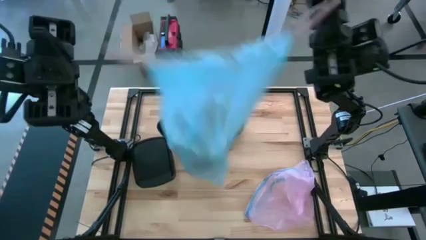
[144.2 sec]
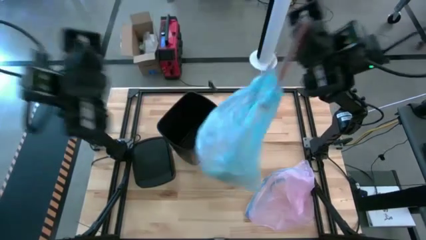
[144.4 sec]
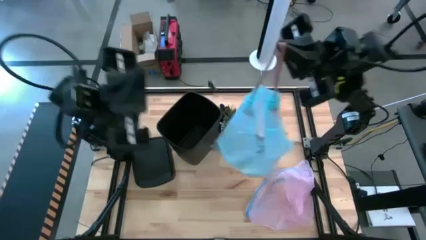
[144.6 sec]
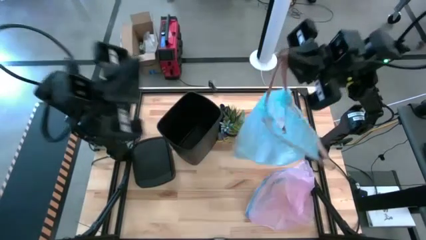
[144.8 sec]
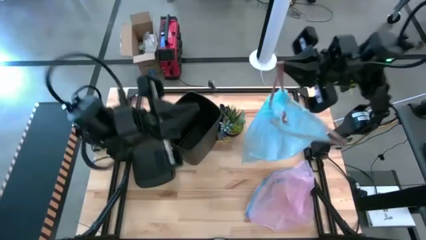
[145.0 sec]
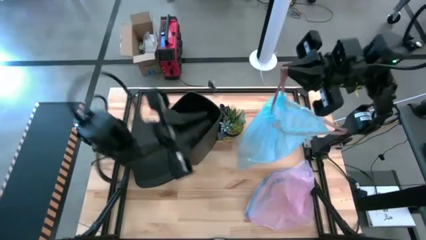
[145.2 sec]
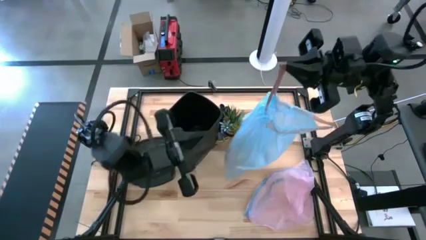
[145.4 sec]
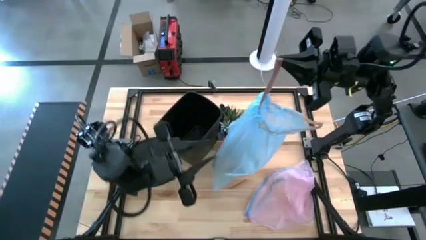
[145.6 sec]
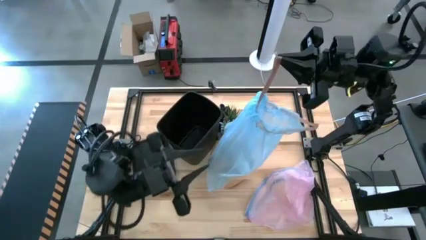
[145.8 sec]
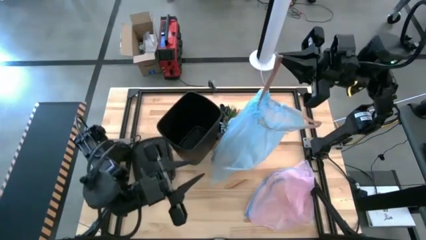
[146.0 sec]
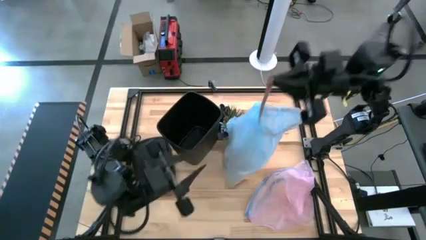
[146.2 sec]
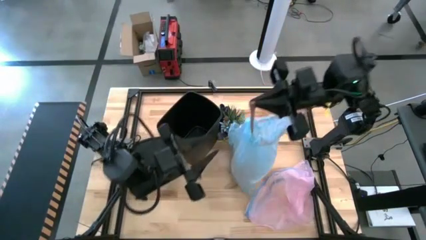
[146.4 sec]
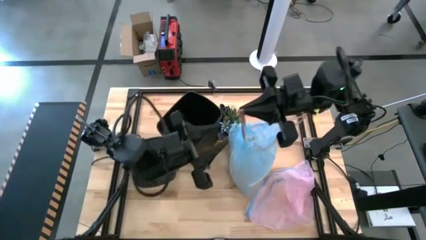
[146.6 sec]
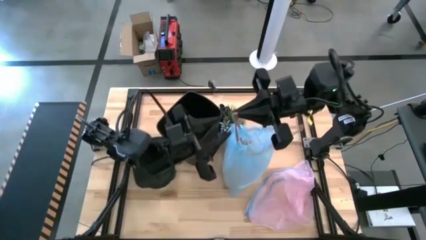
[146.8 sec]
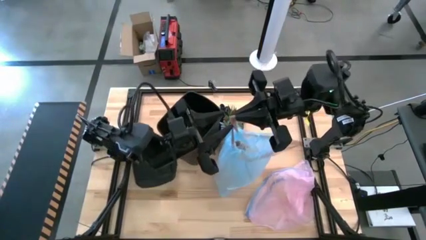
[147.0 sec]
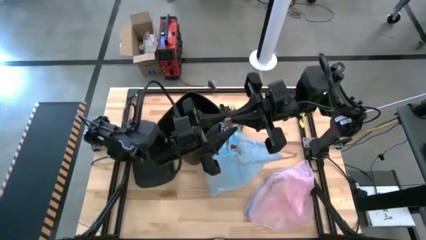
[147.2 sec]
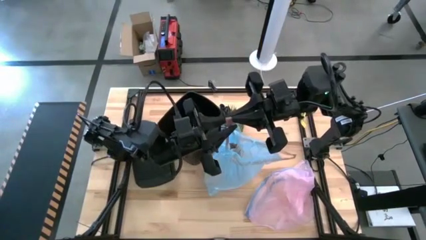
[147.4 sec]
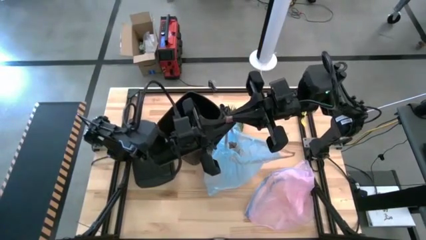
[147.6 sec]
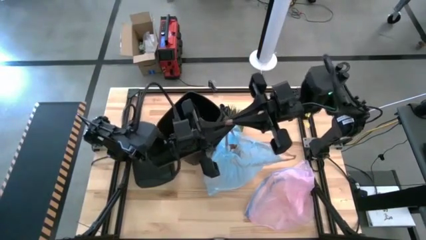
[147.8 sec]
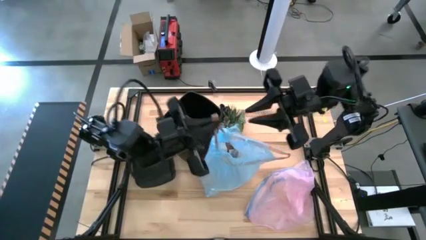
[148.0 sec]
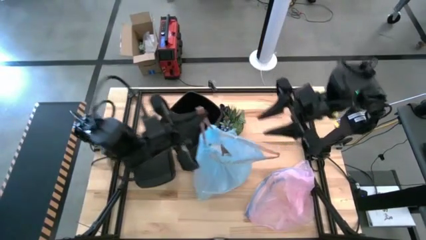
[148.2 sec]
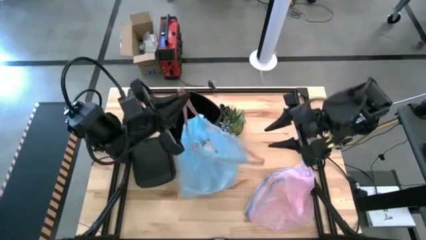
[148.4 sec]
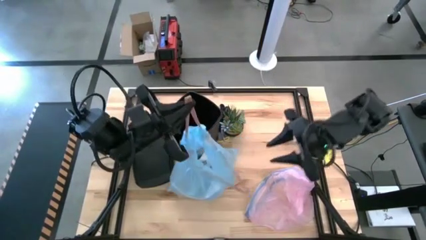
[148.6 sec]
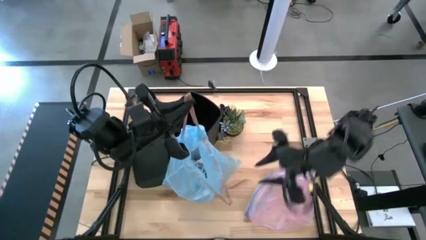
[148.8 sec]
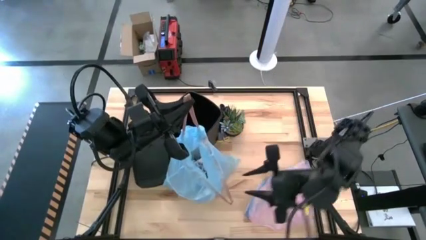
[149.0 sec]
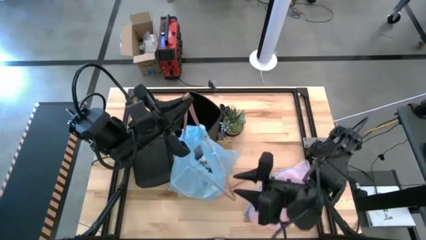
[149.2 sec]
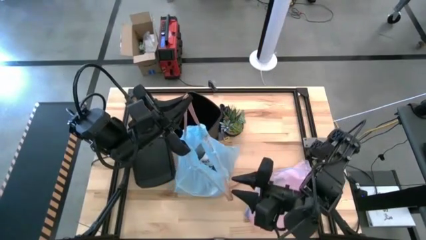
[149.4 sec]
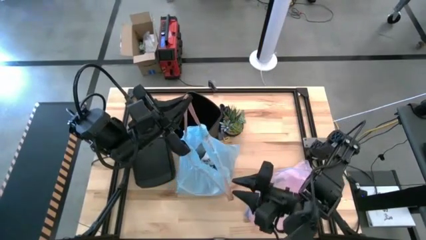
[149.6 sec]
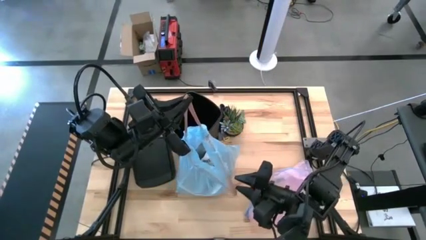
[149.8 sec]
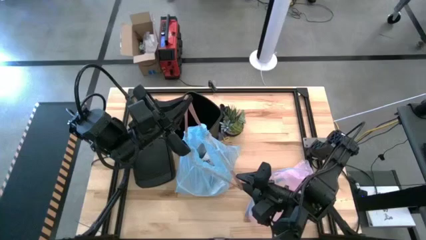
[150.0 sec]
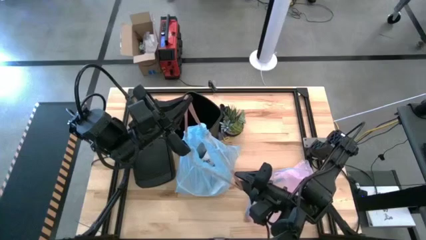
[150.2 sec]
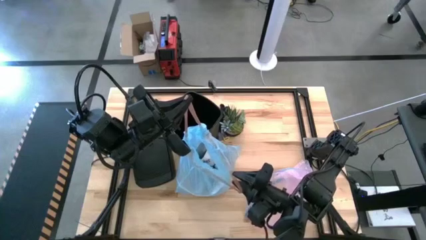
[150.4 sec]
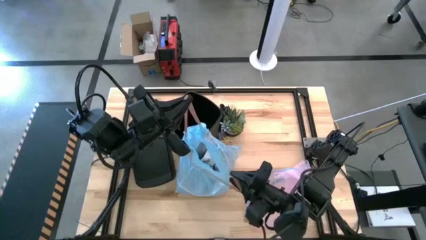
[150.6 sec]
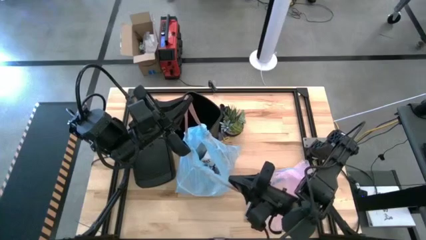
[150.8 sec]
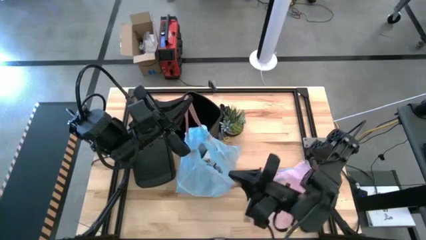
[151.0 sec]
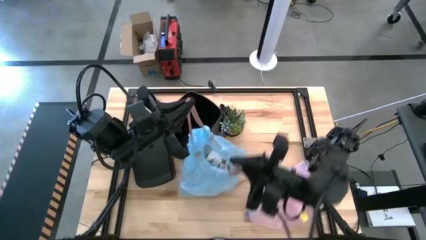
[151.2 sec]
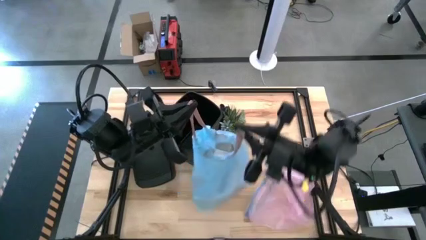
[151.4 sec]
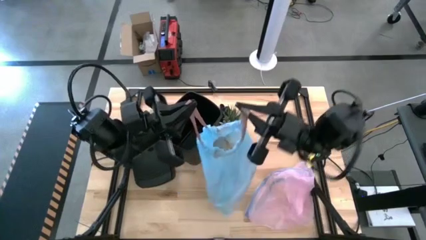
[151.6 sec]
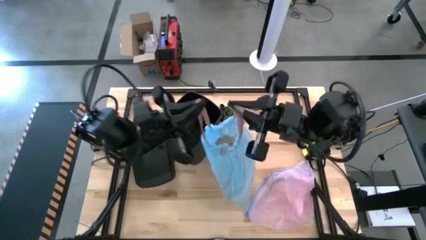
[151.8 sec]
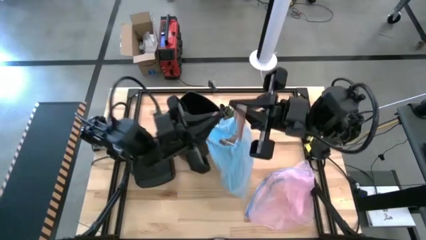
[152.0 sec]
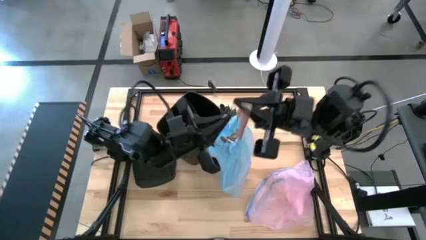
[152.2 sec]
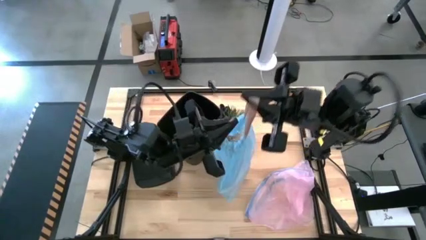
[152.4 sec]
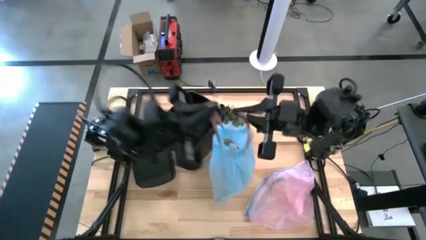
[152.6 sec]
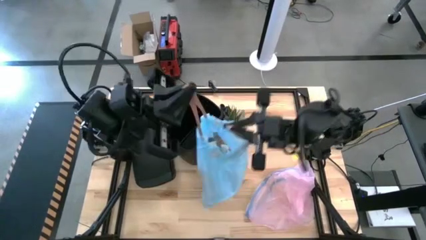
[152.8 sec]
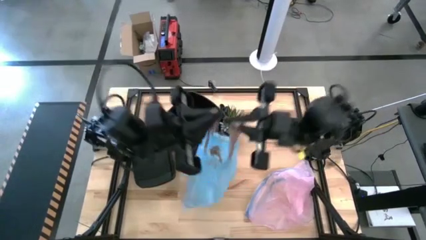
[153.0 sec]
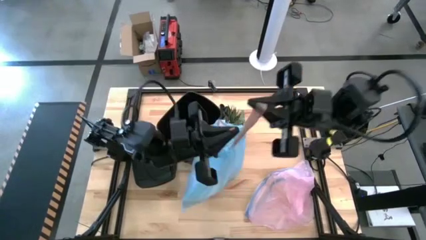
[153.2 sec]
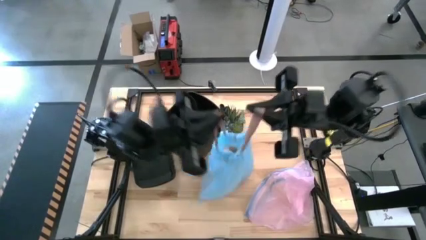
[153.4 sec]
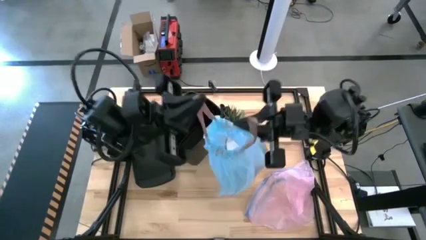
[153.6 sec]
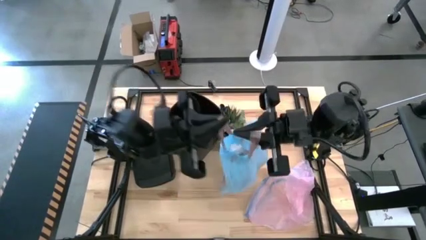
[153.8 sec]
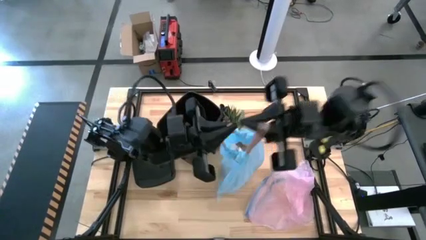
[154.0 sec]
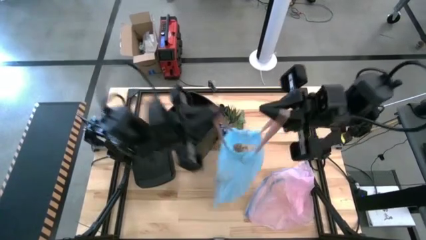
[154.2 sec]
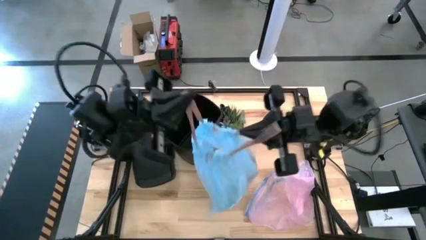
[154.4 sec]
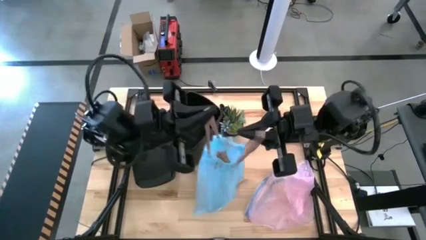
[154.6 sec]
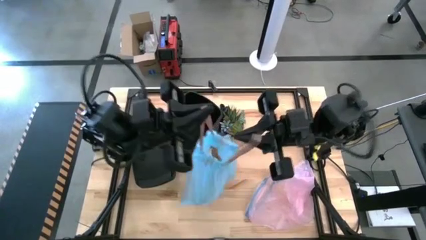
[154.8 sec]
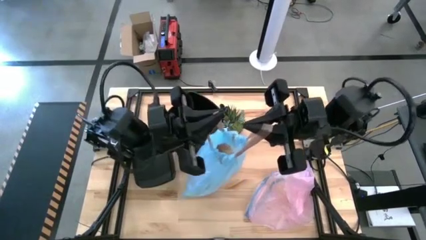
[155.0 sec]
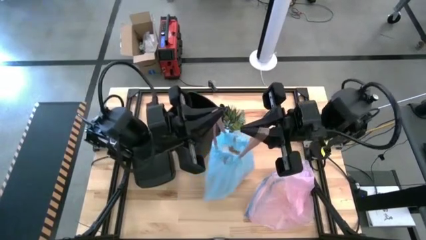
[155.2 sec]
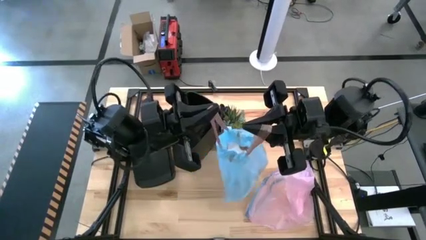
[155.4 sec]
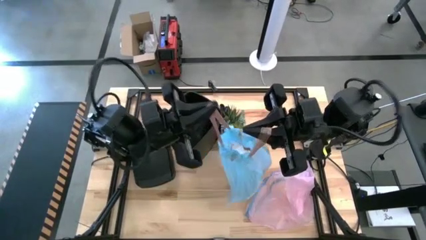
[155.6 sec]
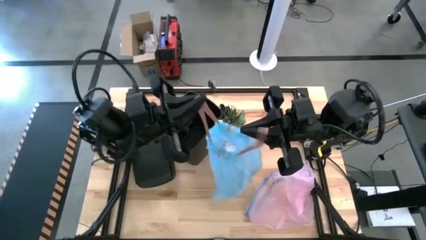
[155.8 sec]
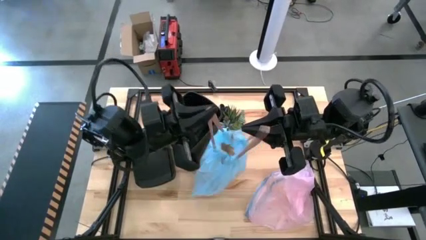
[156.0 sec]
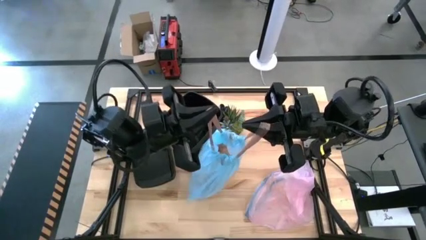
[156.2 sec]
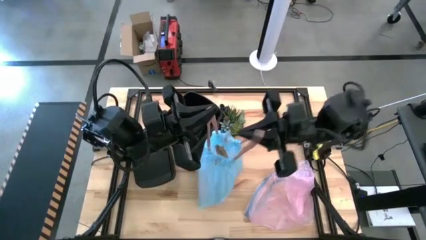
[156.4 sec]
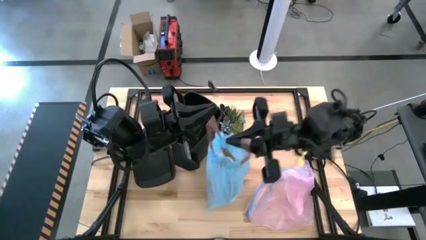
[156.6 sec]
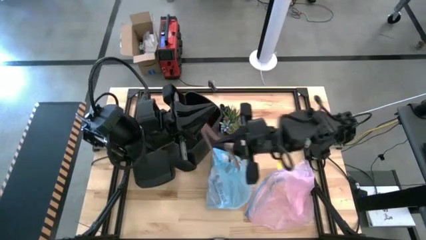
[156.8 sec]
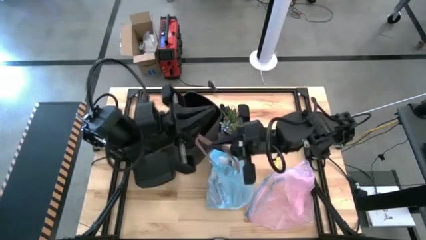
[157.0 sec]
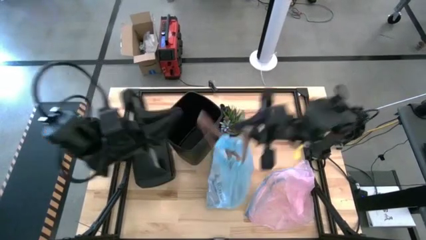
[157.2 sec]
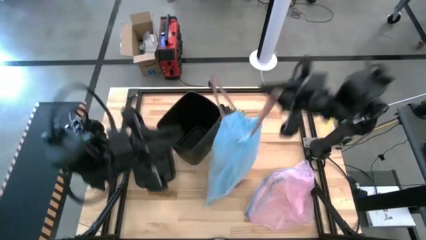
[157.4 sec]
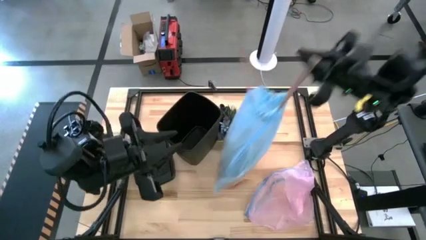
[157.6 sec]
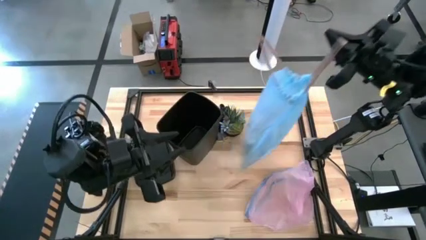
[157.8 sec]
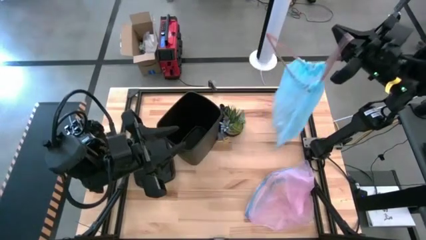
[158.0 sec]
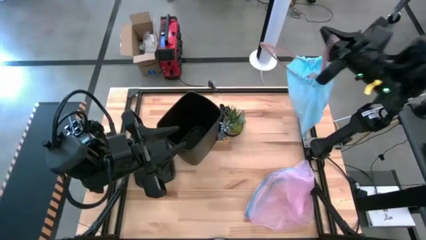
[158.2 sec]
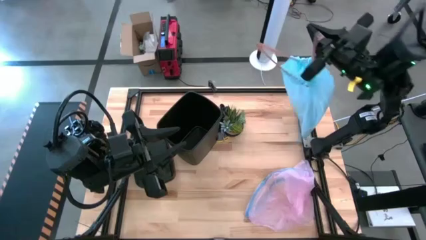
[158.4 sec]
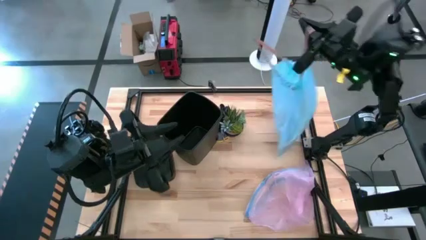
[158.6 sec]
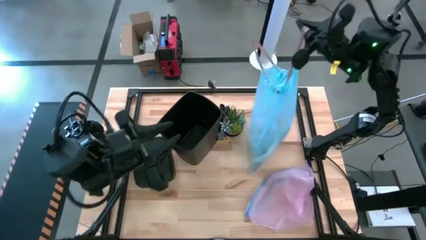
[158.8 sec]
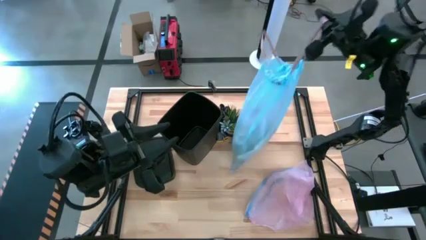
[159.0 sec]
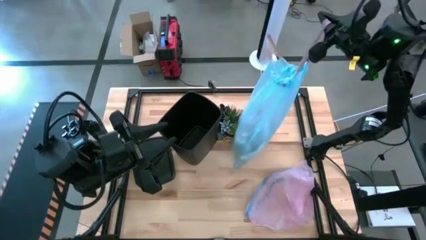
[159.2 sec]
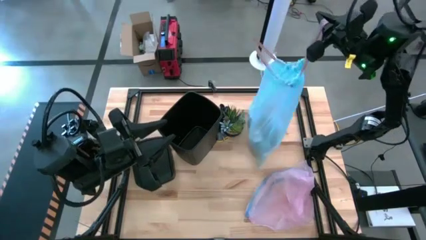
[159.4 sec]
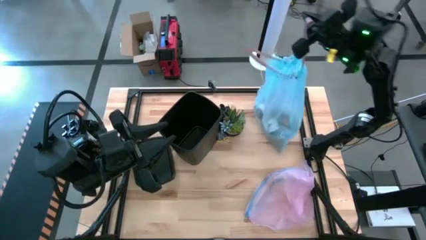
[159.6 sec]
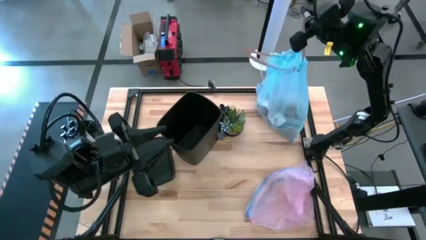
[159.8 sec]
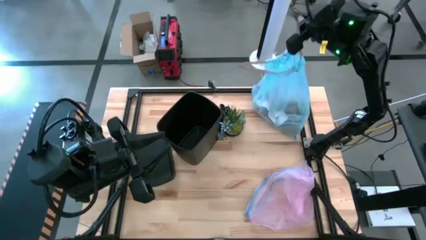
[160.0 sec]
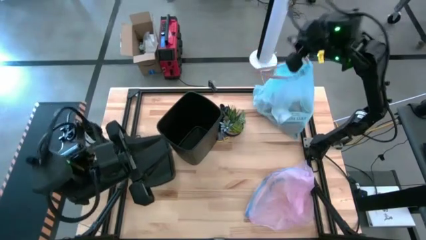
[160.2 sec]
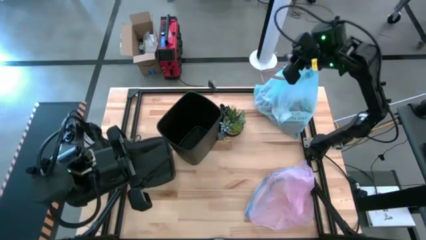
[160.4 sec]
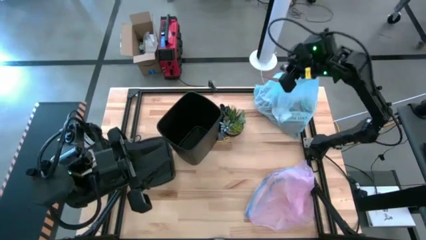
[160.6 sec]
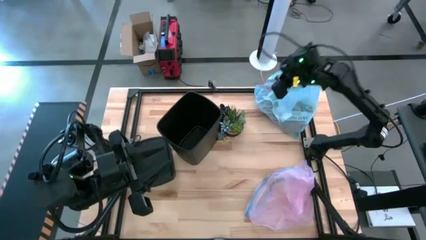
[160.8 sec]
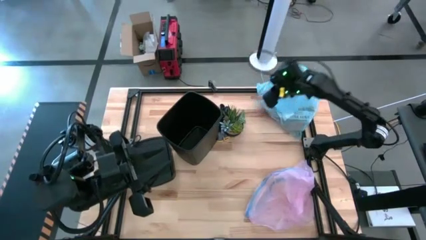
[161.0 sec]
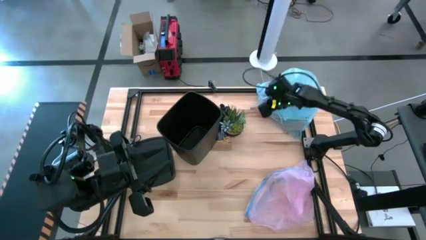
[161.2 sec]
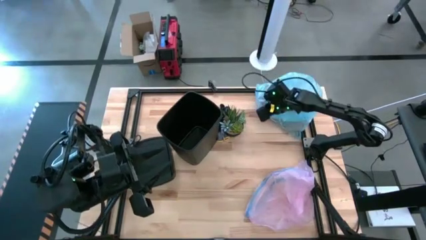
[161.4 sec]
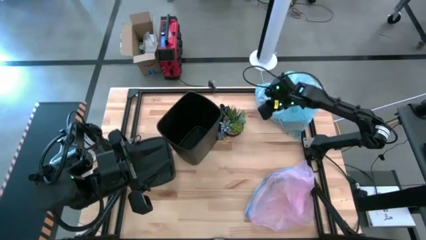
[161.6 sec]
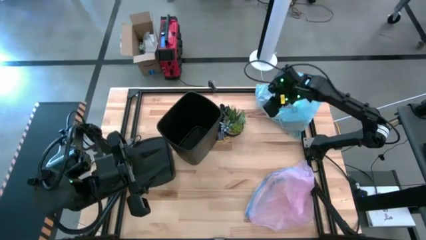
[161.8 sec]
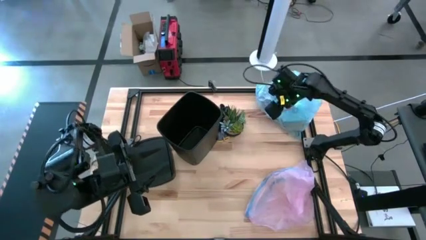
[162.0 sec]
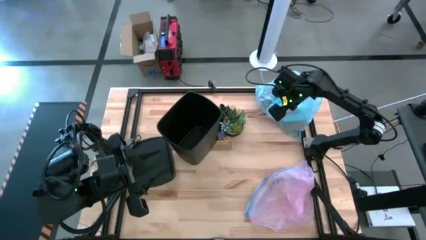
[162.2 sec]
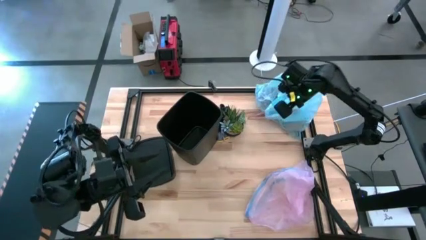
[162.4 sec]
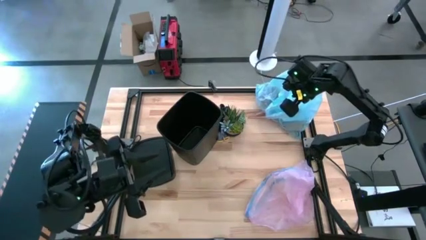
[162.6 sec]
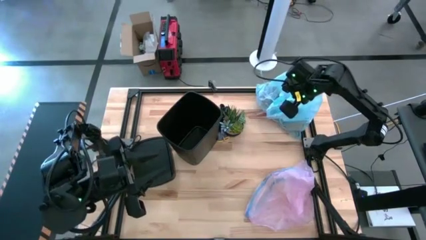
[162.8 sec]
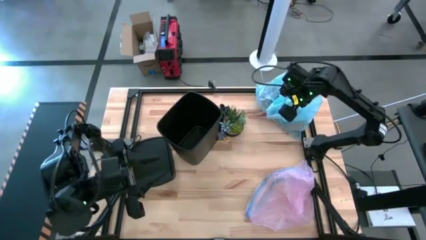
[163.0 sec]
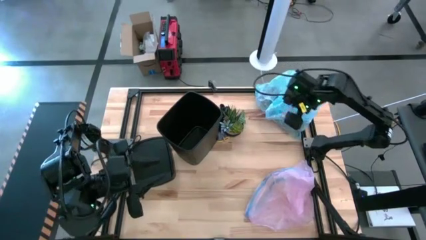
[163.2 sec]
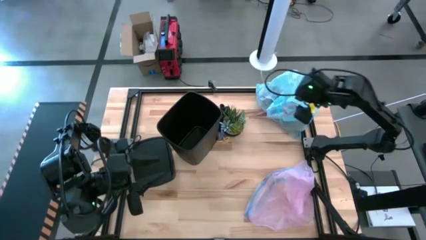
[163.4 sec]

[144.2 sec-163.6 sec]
Task: place trash/remove bag and relplace
Close the blue trash bag
